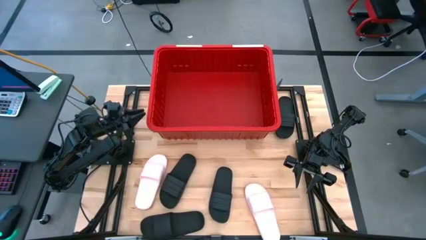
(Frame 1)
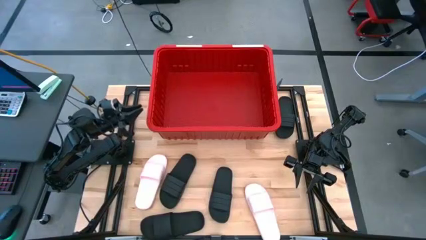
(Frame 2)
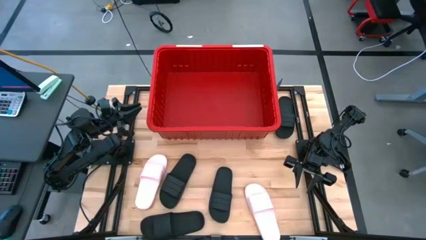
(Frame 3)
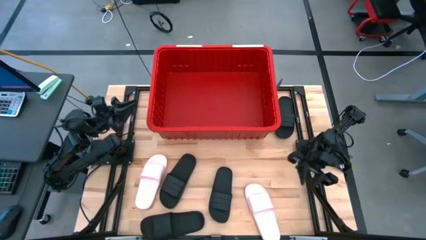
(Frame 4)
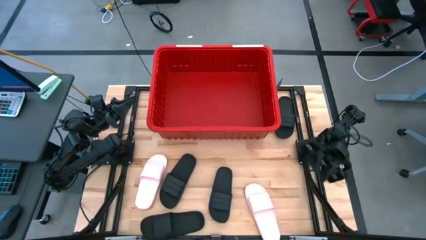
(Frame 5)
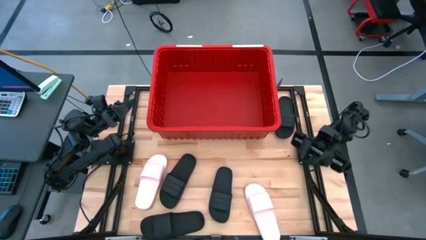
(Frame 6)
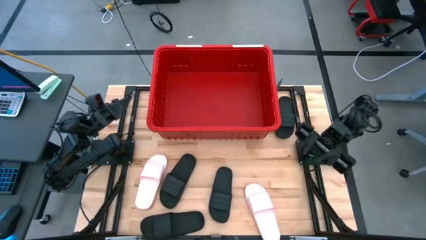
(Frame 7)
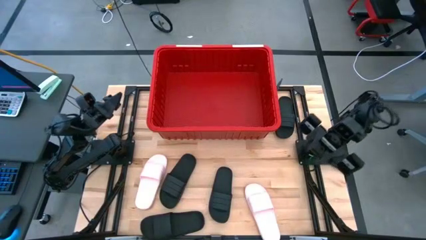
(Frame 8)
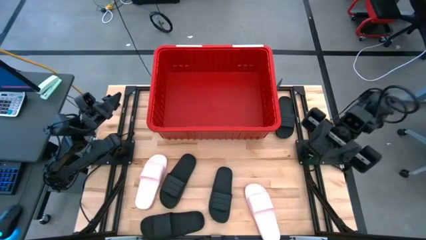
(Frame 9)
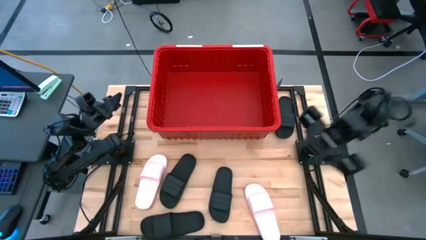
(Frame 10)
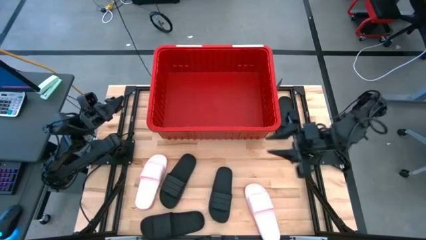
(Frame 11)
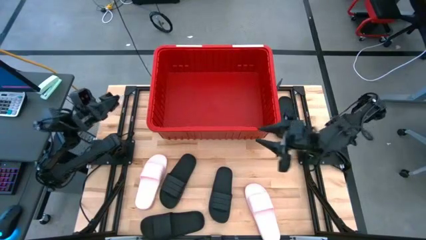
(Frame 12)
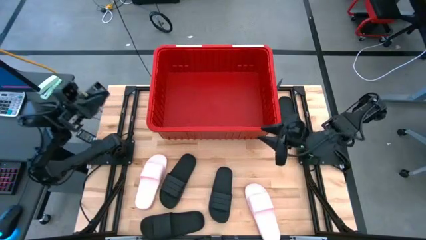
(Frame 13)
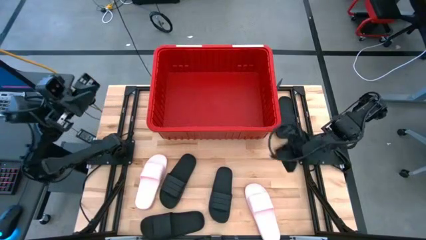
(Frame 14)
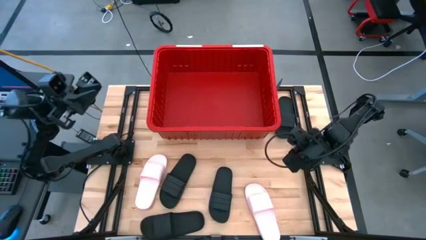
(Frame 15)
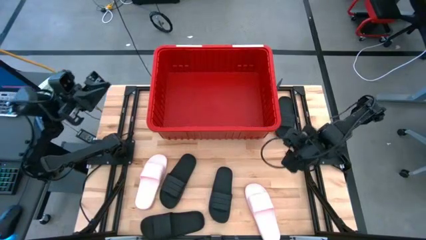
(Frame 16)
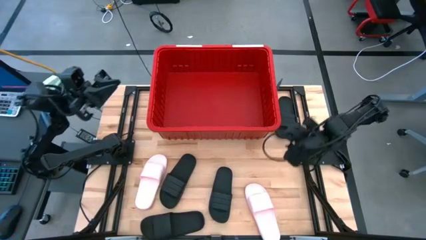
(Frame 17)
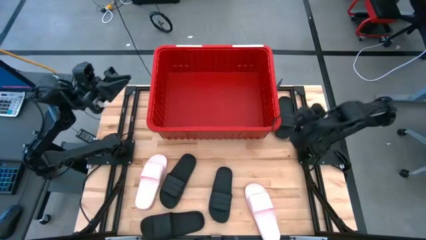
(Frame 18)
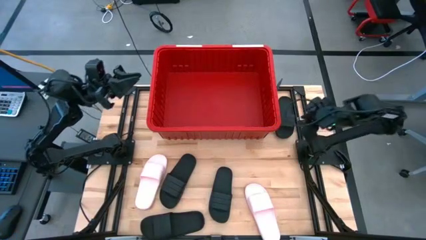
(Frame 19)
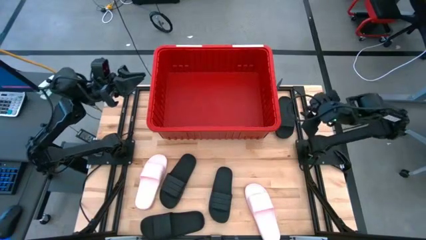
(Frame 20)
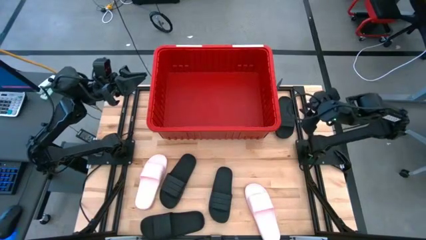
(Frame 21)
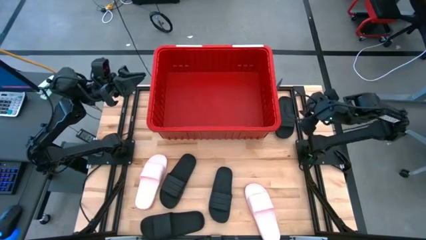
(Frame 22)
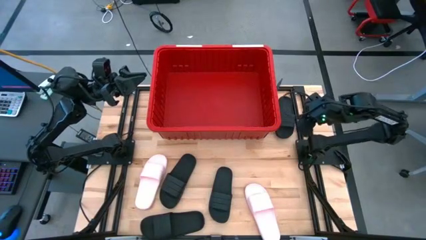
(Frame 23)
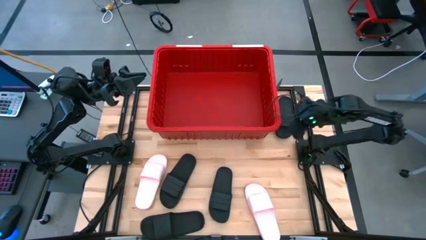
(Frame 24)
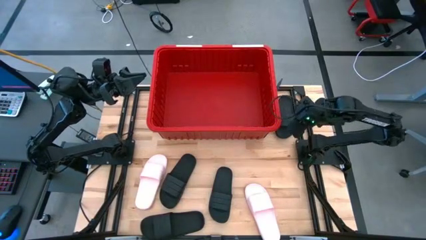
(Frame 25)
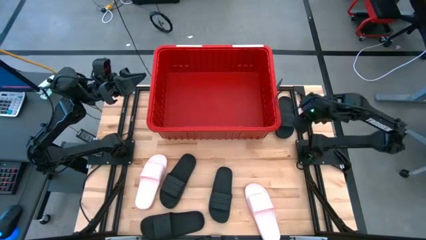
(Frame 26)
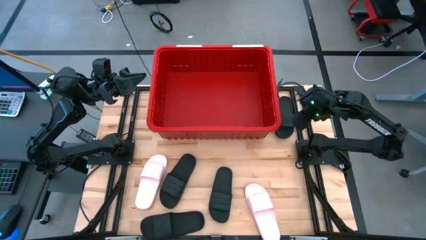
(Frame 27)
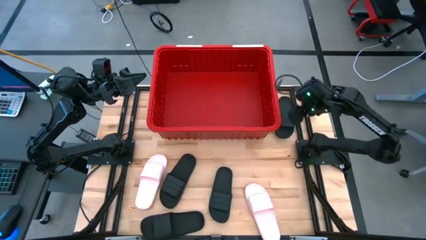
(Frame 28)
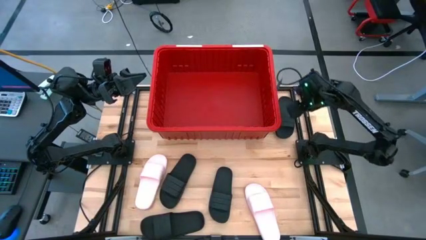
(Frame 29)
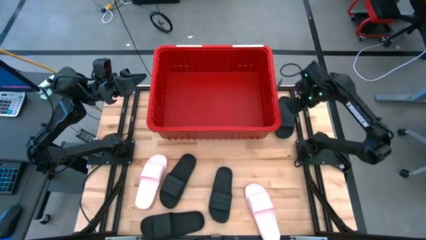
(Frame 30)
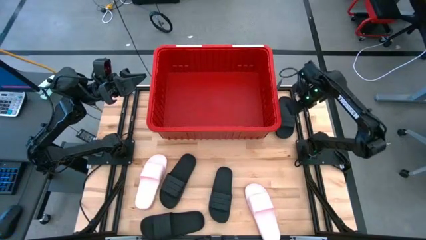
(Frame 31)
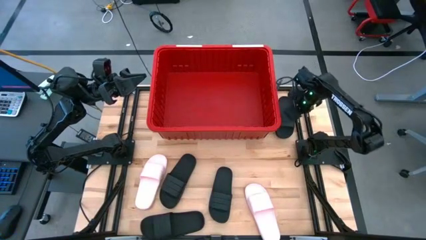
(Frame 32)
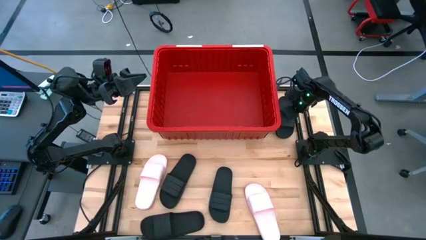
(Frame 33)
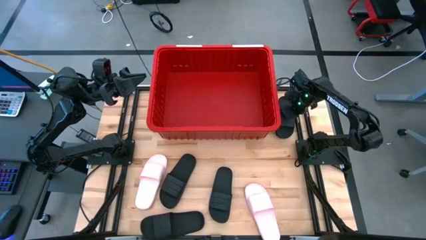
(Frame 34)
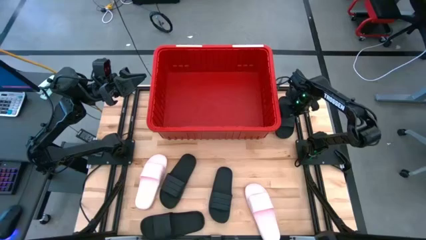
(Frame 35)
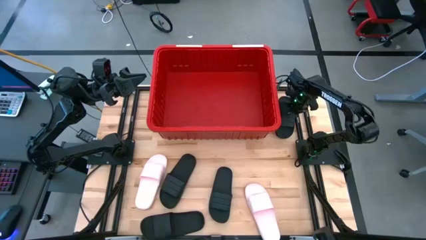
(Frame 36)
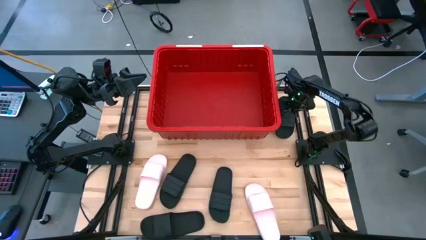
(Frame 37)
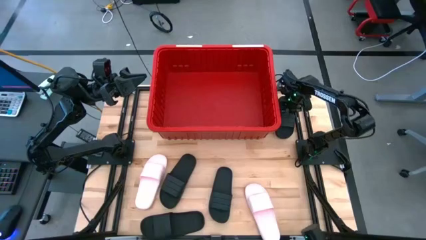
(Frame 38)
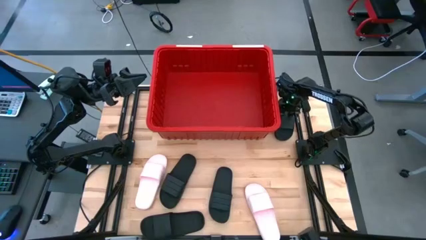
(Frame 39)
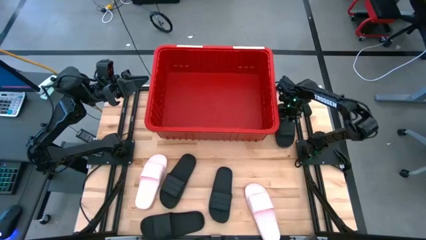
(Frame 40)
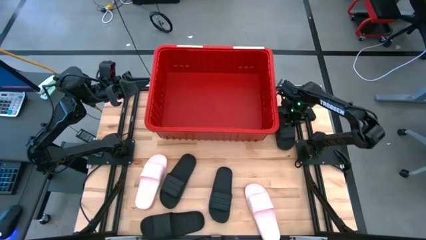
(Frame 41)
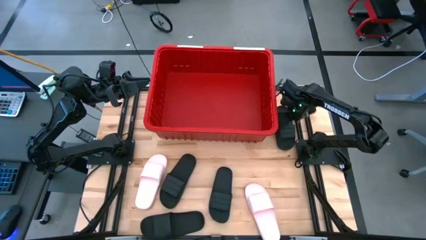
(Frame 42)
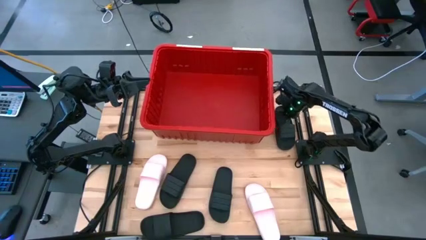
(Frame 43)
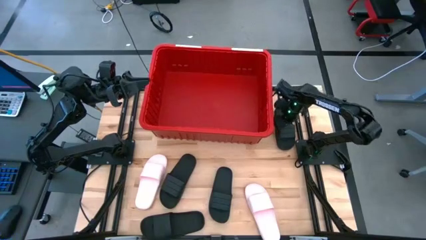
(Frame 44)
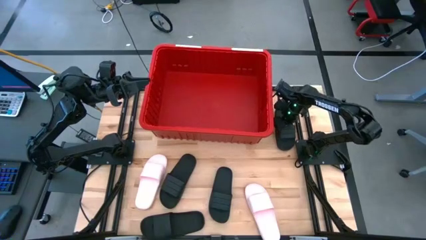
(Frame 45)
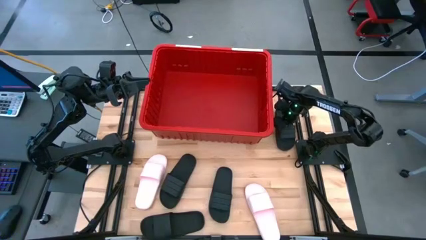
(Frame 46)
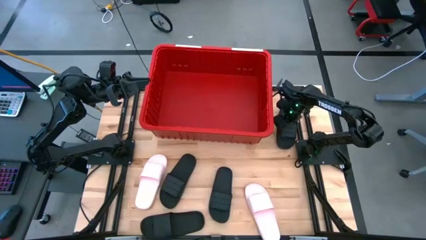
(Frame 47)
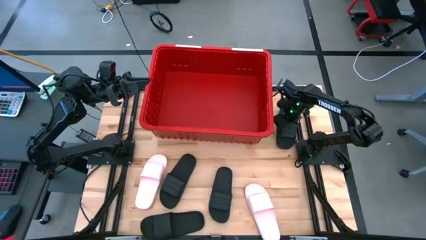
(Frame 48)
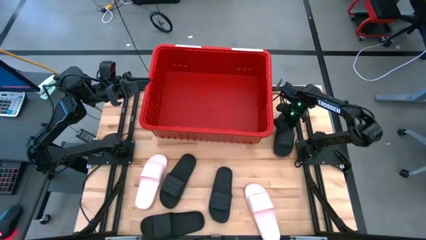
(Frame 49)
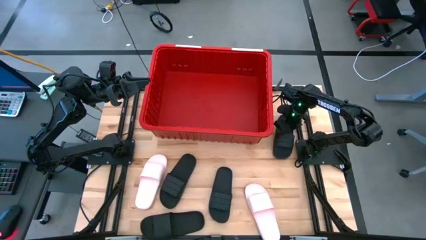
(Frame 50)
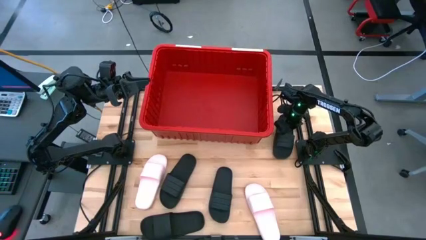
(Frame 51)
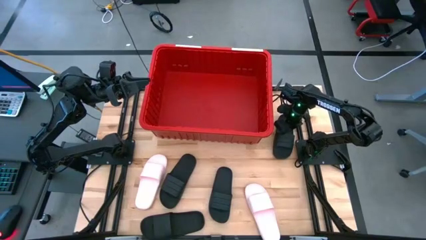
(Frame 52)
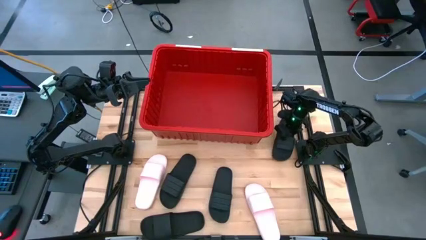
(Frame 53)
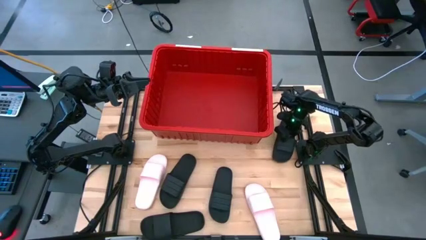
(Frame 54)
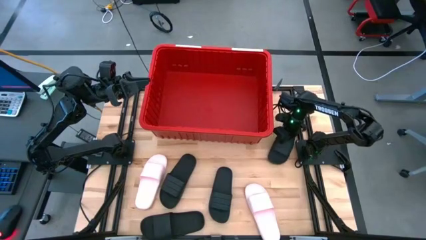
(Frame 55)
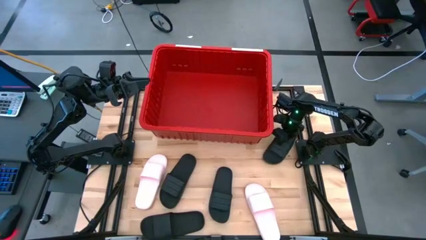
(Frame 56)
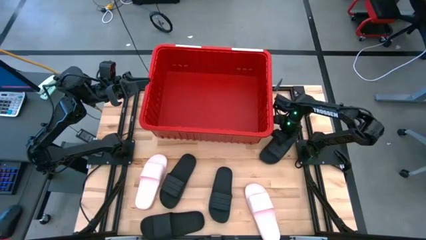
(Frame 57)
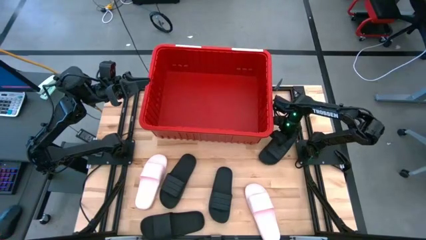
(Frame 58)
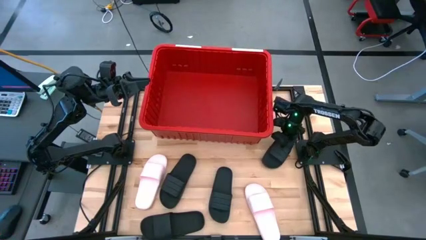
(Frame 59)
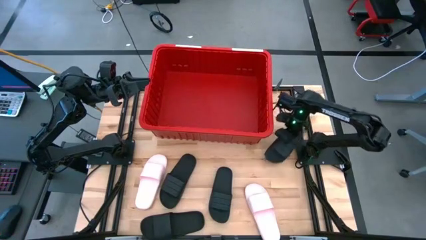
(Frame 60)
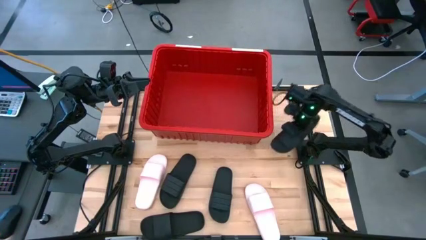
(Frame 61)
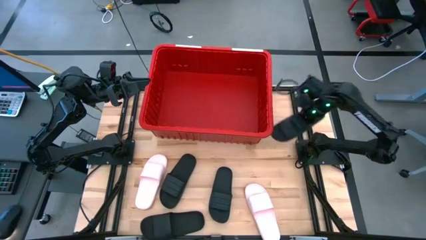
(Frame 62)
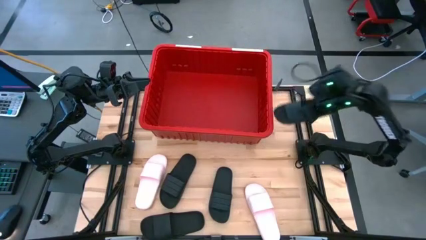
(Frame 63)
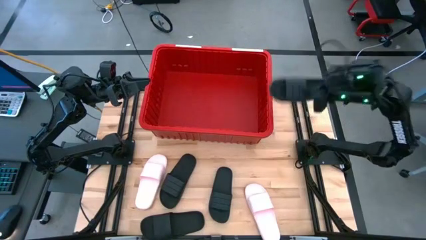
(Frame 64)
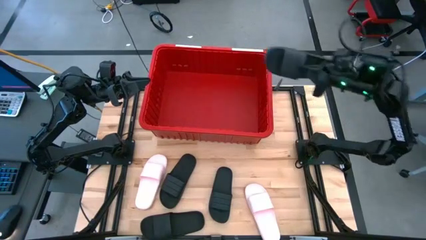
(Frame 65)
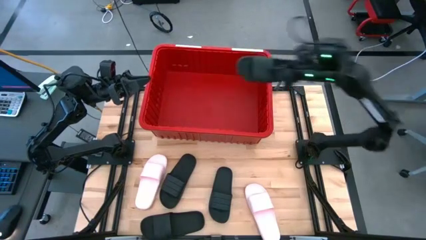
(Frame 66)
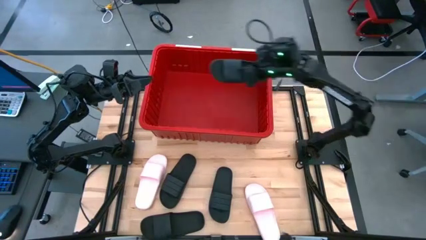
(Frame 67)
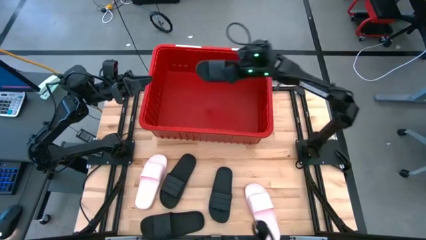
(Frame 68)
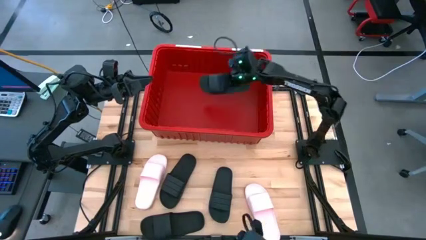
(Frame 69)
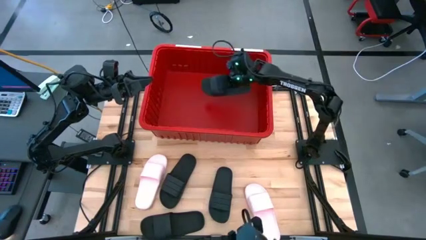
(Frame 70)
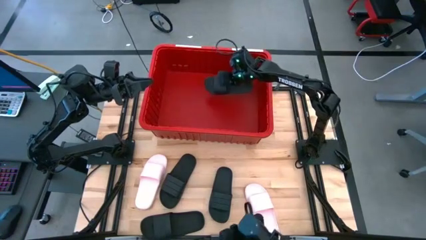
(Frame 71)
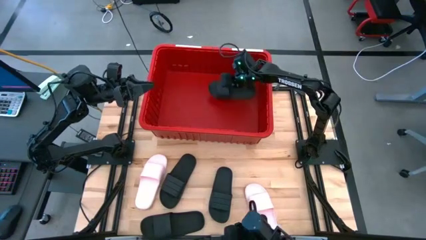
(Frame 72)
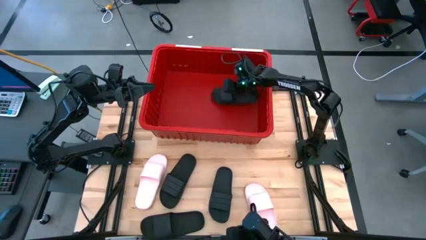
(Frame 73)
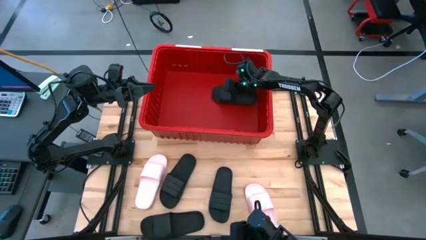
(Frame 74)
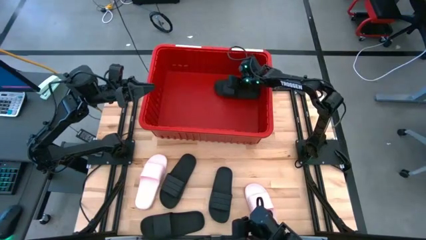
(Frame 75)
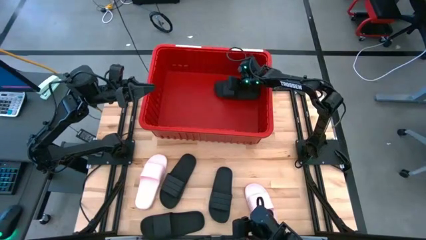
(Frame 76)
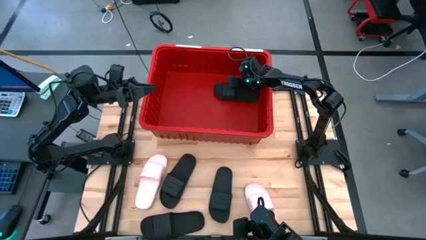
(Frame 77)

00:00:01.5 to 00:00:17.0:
Task: Pick and place slides into bin
Put the black slide into the red bin
